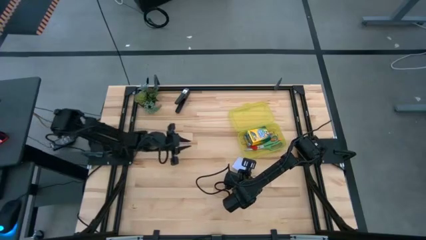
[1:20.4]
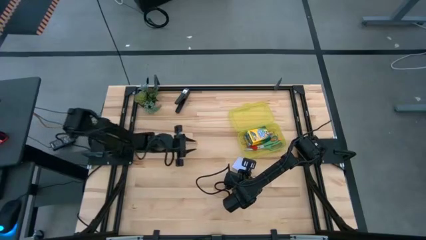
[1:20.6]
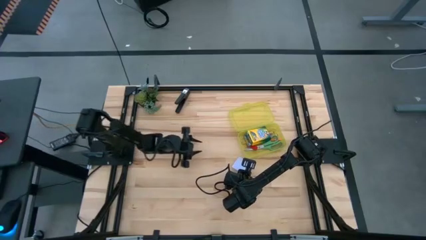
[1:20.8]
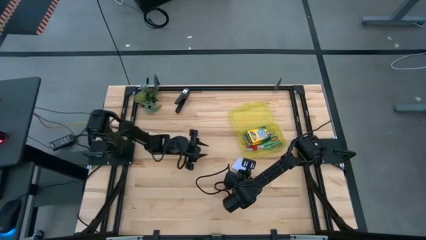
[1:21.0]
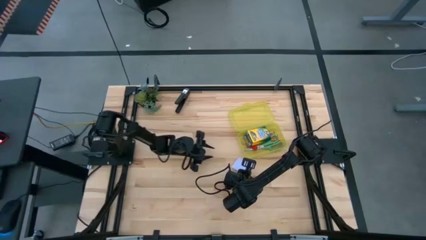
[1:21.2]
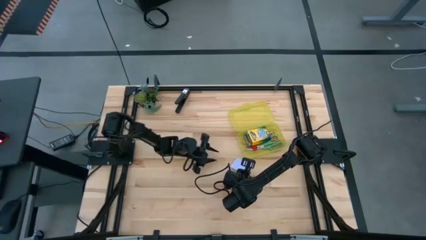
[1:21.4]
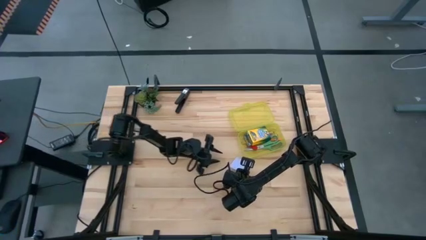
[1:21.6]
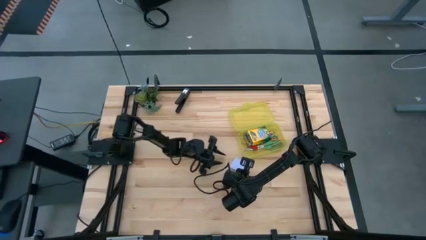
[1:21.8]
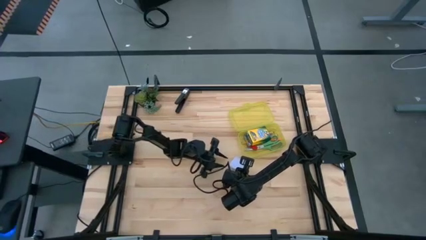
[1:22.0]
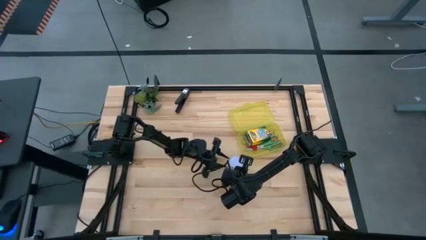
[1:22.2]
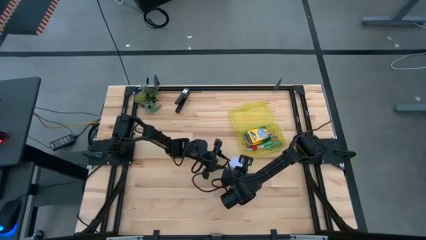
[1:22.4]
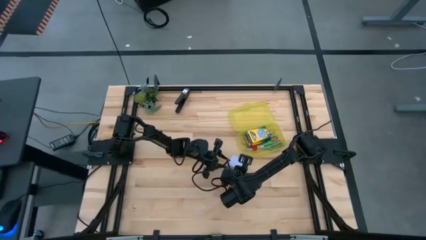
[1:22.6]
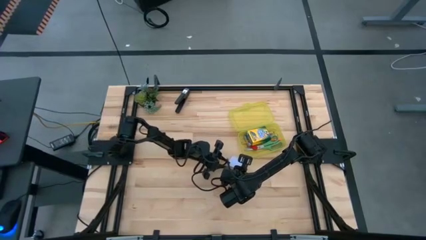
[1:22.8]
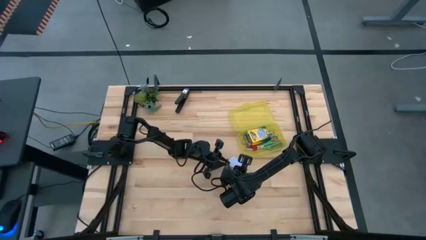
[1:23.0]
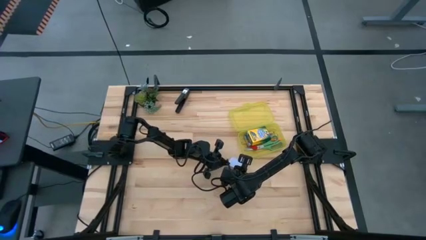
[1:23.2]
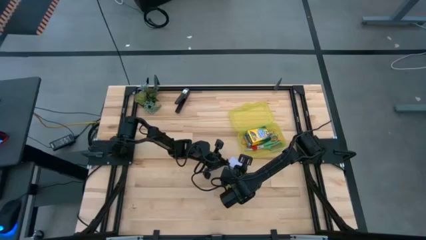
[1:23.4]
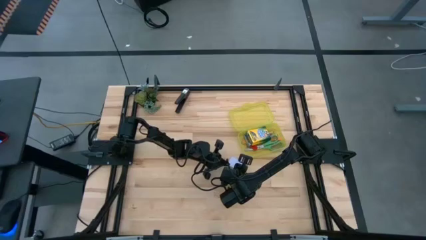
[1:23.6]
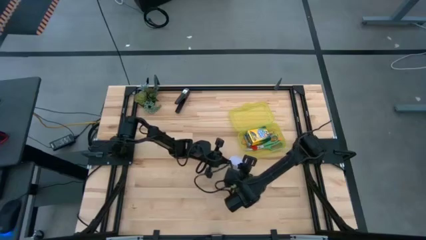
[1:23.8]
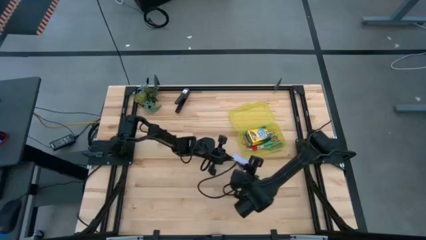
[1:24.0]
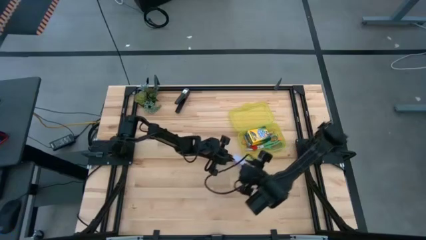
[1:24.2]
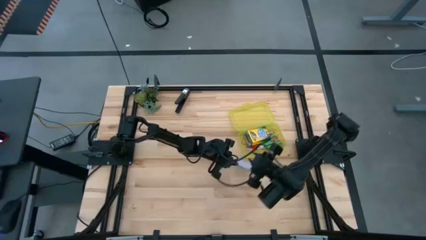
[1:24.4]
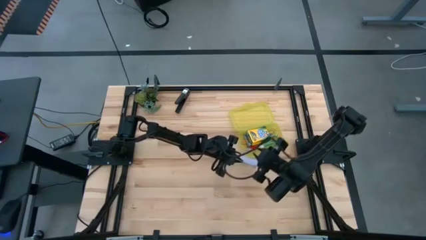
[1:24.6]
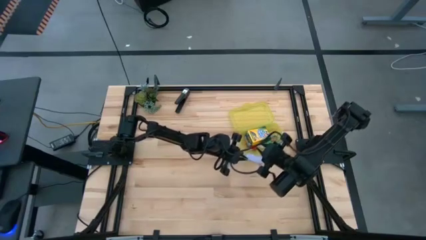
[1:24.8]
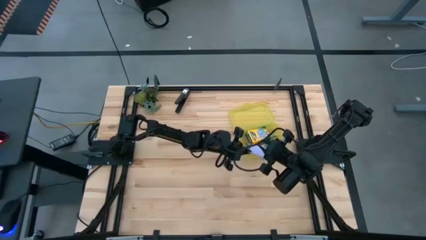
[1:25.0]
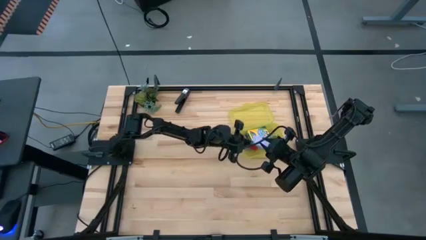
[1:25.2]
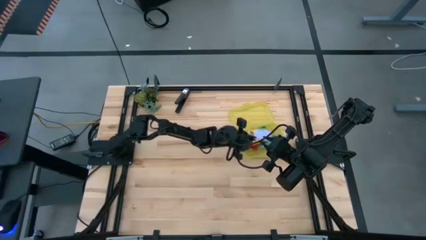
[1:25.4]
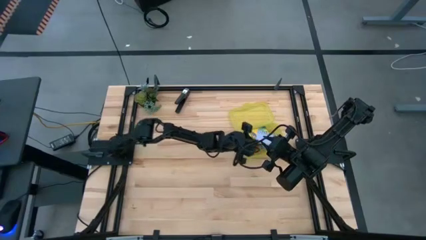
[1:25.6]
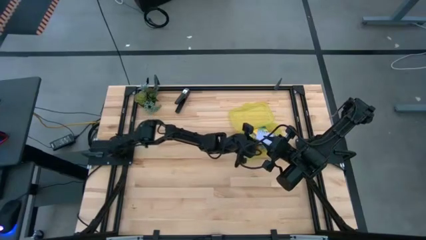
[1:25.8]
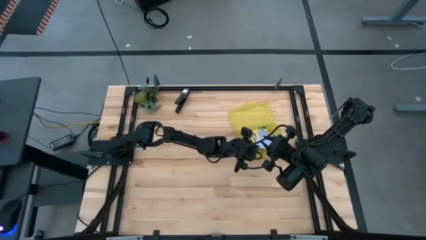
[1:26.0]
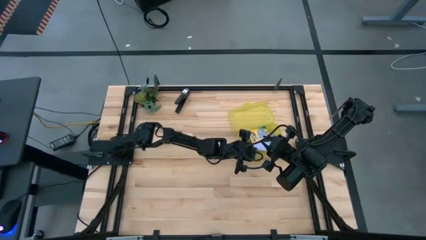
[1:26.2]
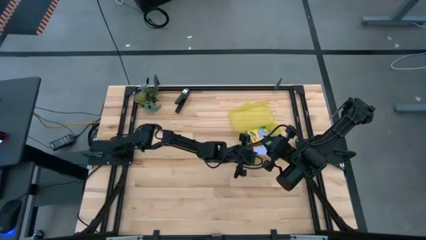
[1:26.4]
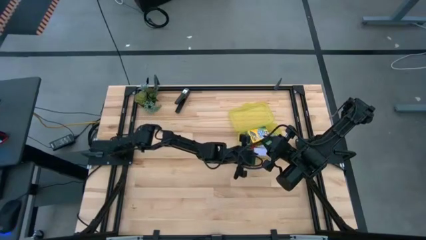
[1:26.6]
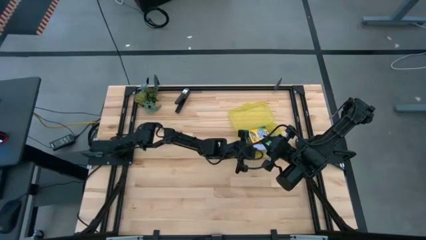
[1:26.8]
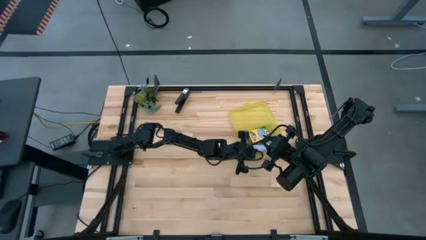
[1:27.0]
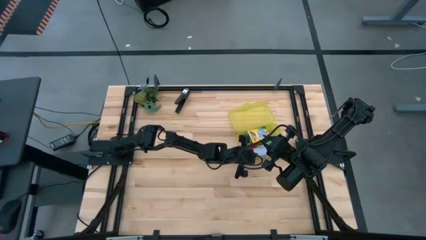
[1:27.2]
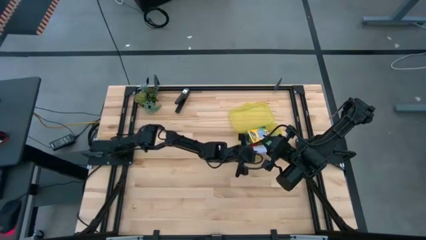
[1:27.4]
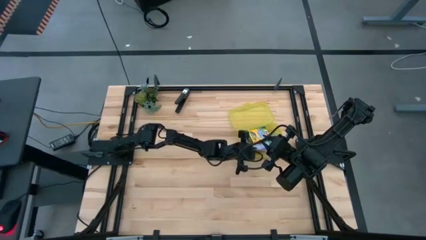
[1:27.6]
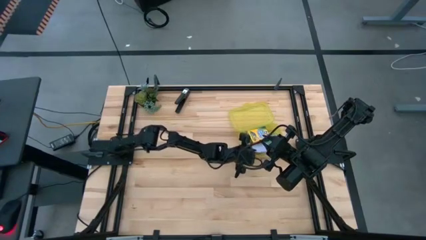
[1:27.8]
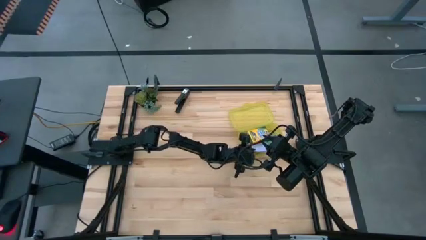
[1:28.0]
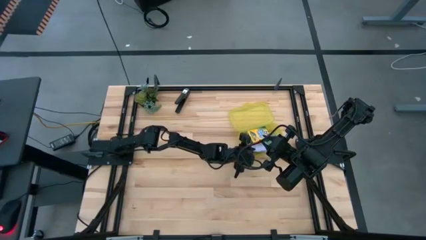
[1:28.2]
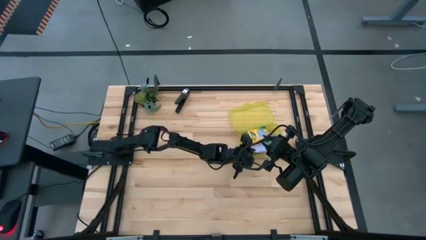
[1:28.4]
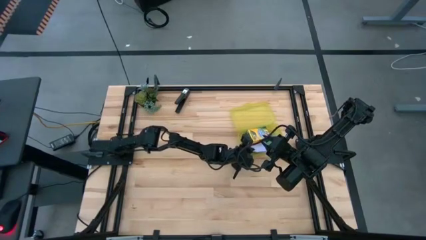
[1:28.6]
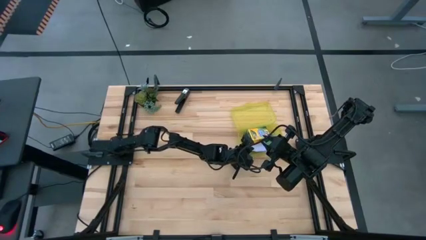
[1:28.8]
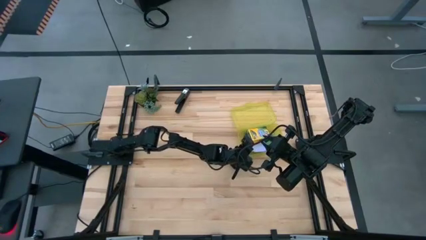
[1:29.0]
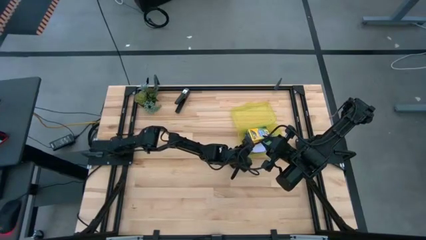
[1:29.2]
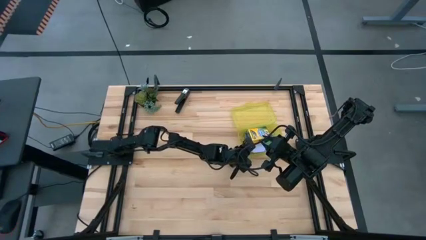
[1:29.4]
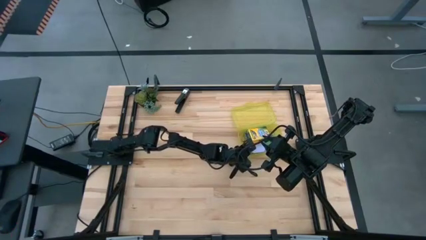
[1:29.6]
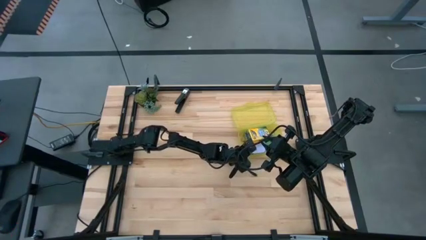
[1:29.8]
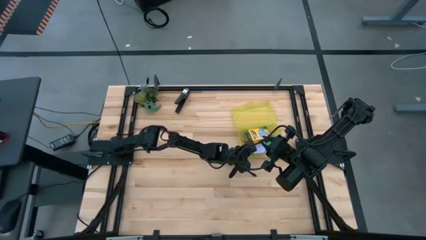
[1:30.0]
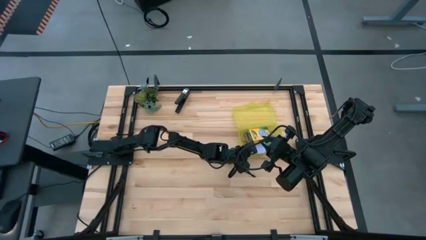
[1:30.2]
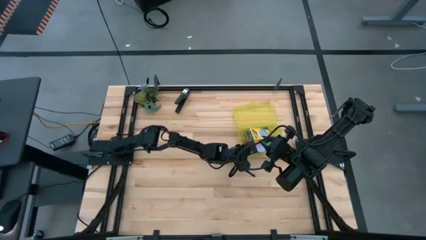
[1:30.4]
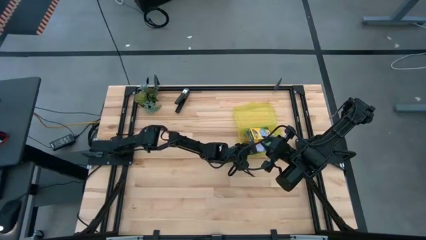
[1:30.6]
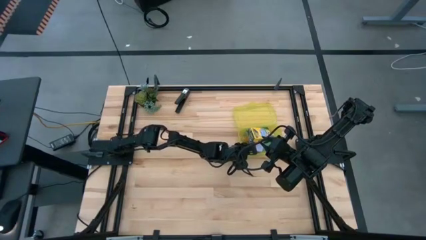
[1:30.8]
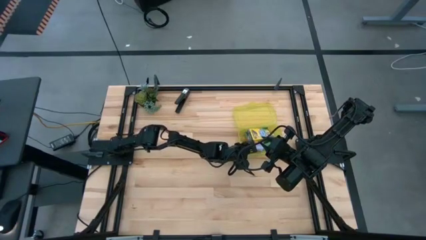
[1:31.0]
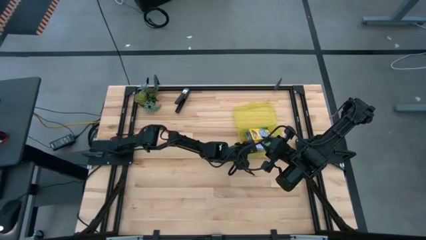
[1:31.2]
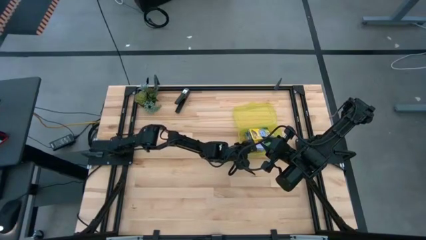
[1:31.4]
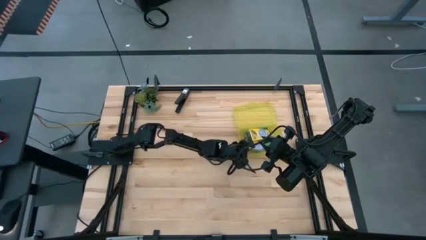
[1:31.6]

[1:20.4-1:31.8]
Task: Pack school essentials
Put the violet sticky notes into the yellow supply box

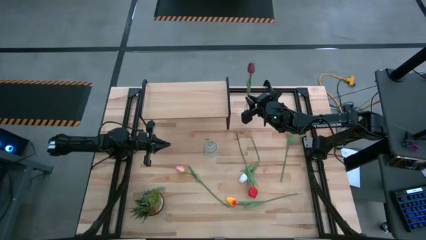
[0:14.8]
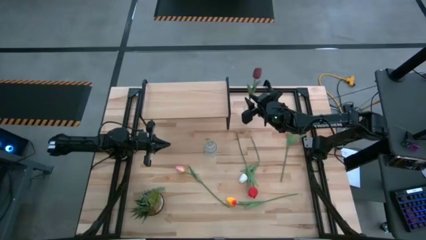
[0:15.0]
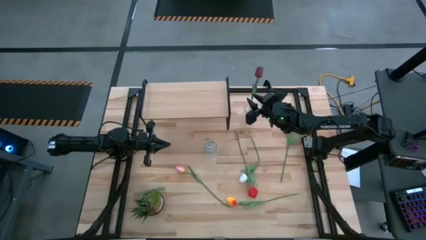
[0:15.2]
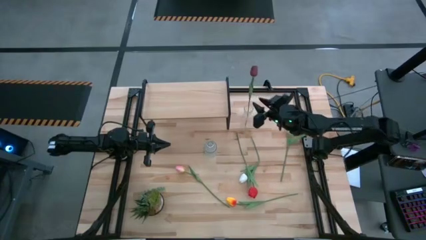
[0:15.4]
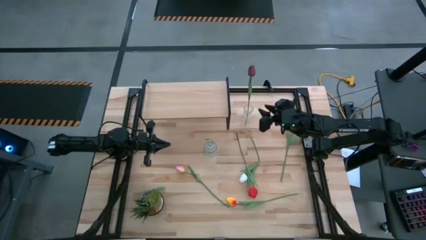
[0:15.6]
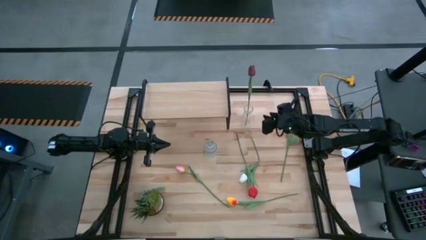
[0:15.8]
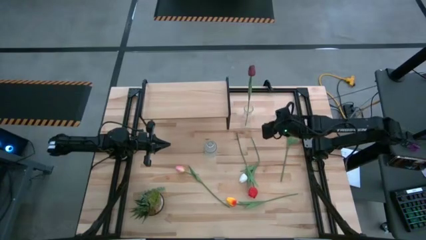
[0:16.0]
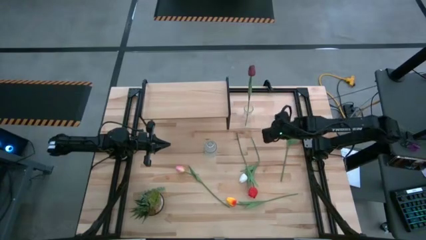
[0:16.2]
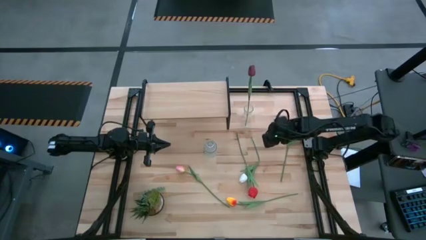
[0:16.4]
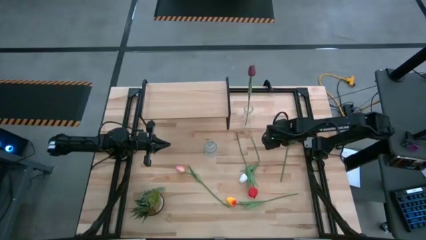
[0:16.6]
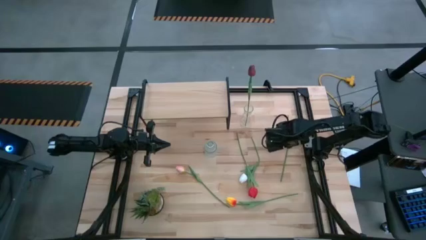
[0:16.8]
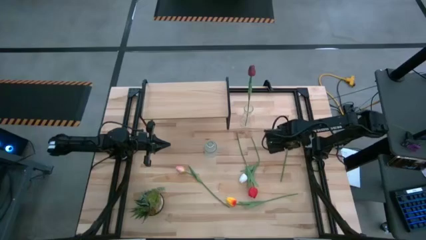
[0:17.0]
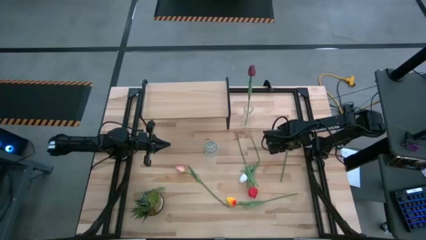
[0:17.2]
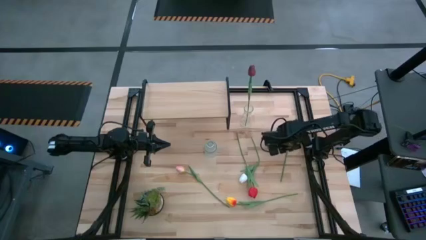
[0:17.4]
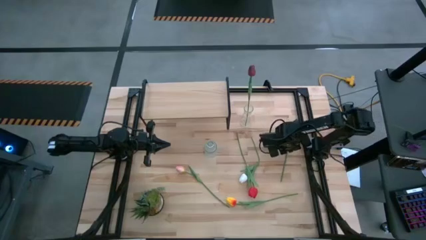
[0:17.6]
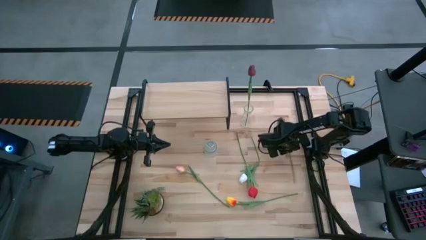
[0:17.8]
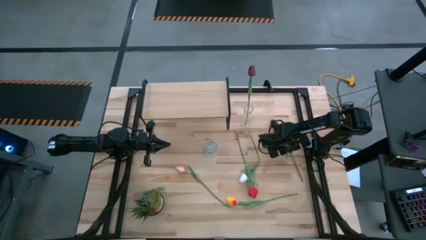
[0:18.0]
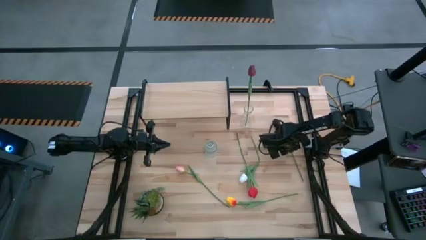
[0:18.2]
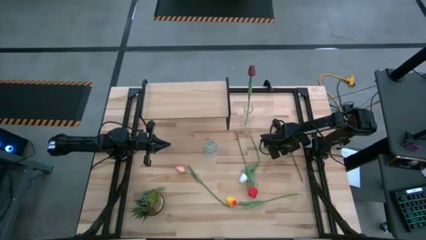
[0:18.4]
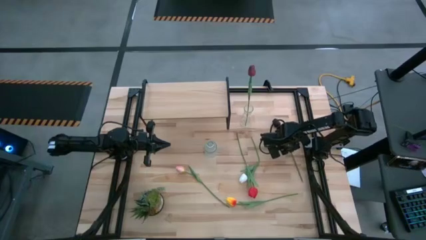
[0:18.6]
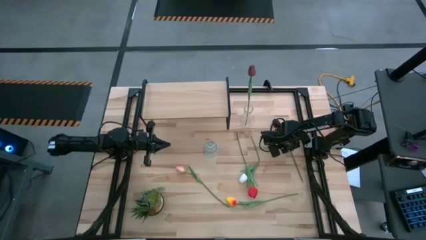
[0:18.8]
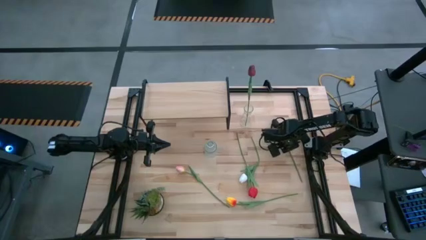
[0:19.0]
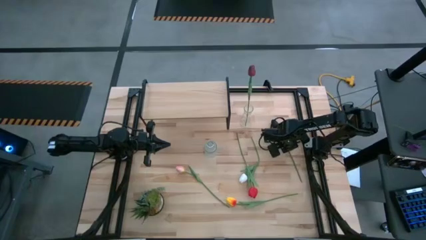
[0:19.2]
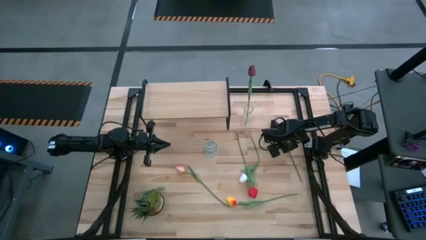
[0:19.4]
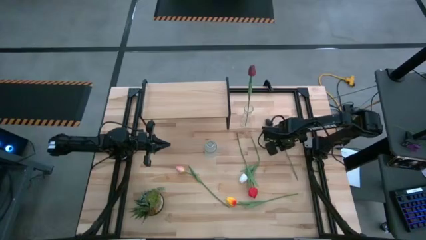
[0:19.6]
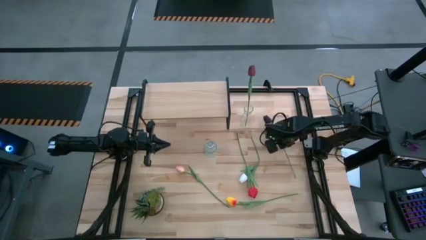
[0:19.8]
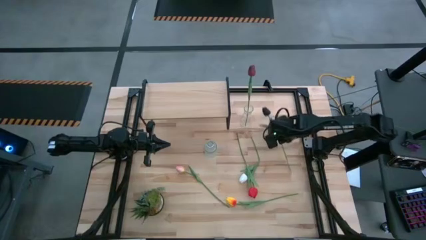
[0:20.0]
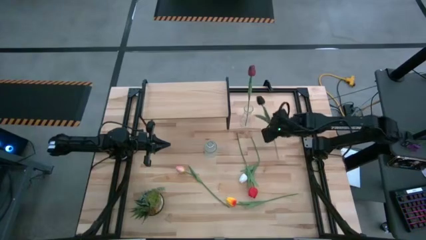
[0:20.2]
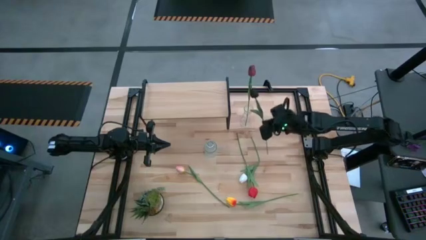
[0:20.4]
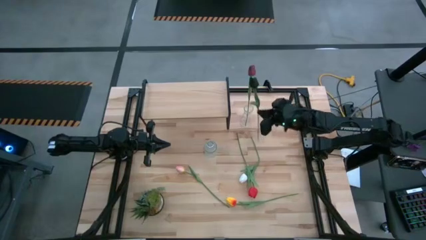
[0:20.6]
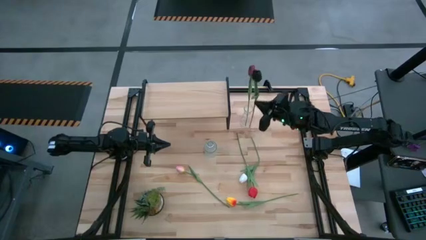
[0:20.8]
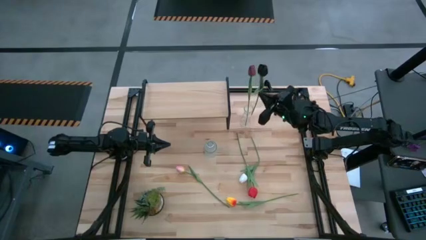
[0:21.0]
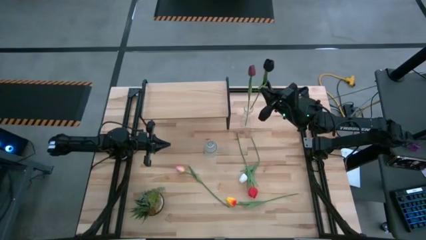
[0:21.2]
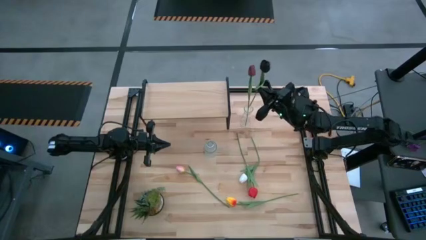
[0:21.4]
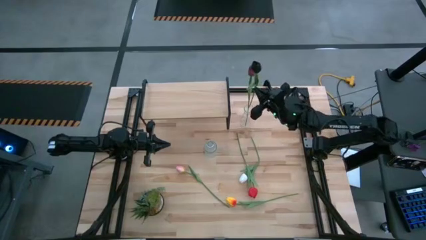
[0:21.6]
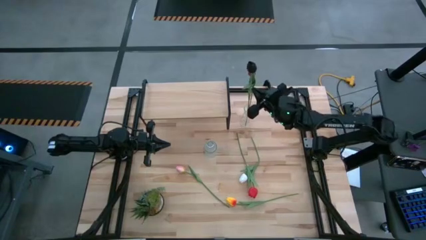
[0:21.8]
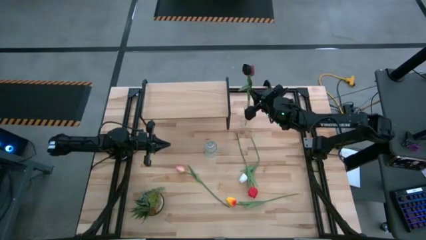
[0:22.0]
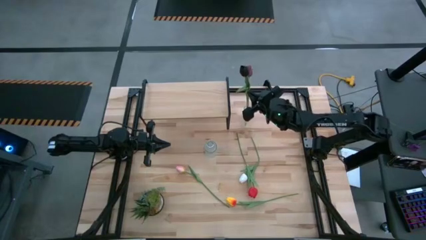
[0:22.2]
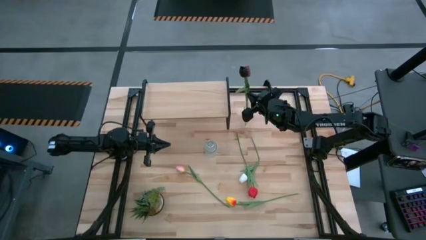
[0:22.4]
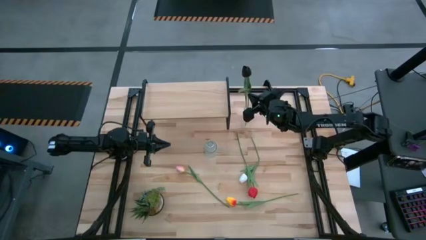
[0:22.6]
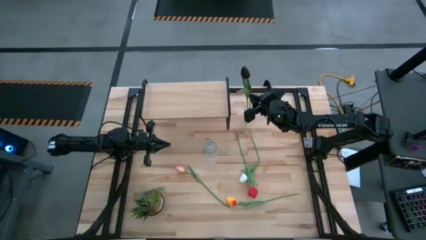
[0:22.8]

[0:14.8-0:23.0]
Task: Pick and place flowers into a vace then onto a shelf
Put the black tulip into the top transparent vase
